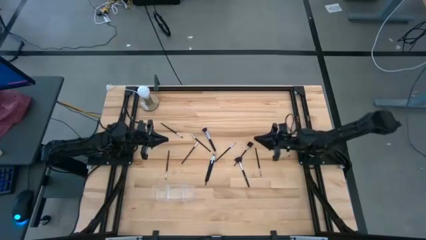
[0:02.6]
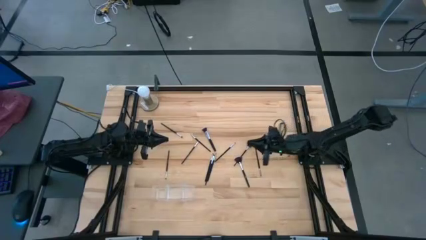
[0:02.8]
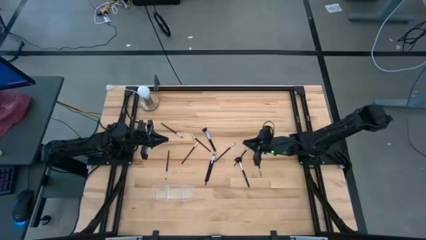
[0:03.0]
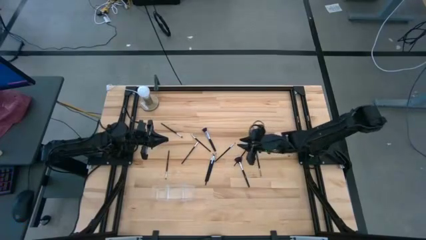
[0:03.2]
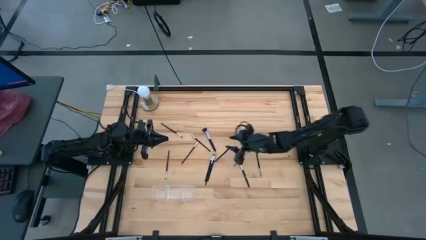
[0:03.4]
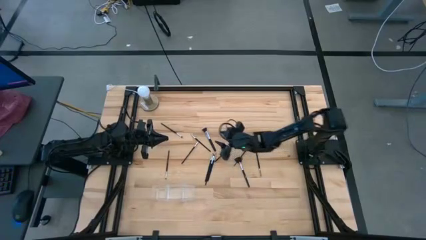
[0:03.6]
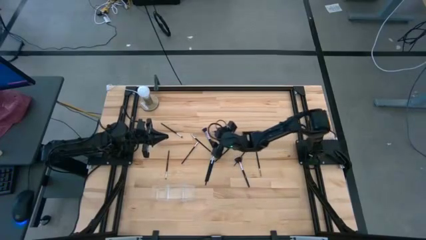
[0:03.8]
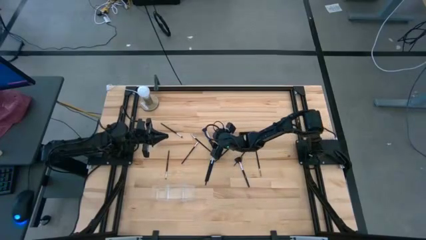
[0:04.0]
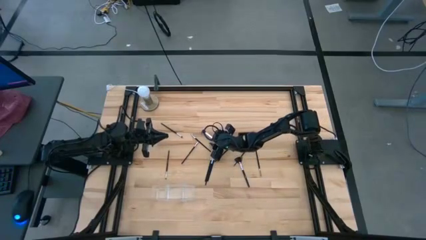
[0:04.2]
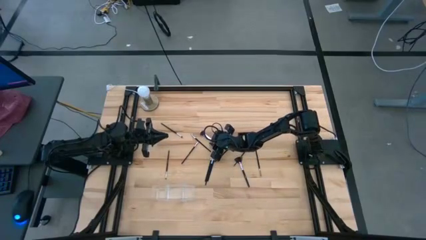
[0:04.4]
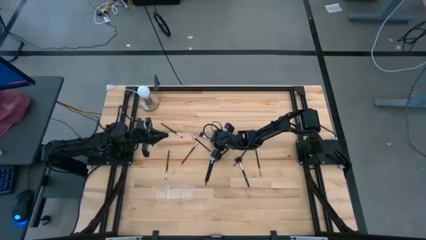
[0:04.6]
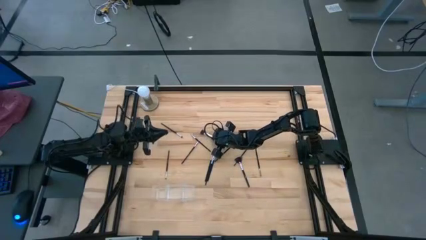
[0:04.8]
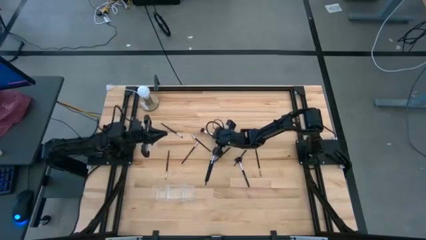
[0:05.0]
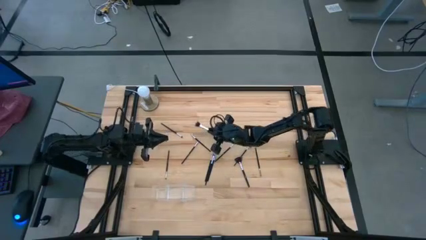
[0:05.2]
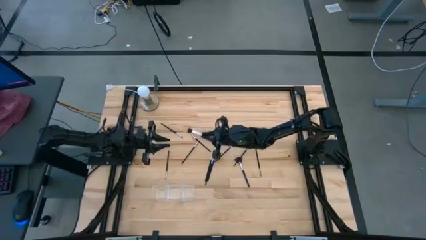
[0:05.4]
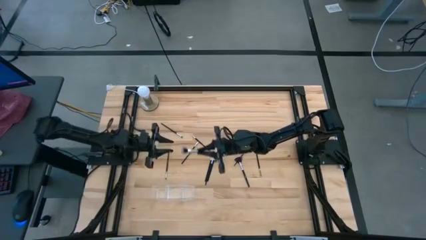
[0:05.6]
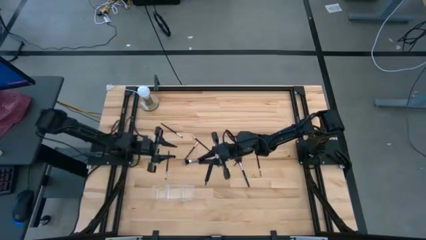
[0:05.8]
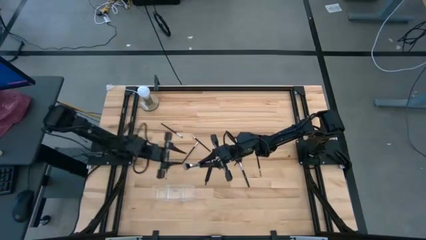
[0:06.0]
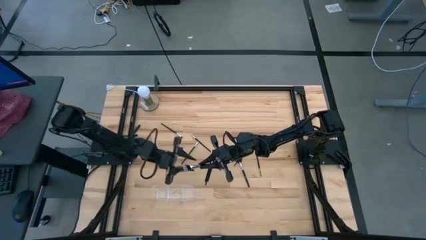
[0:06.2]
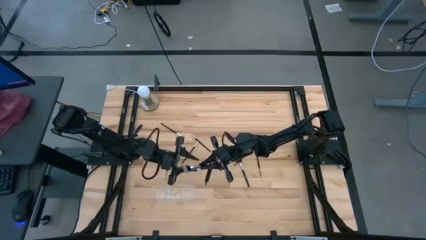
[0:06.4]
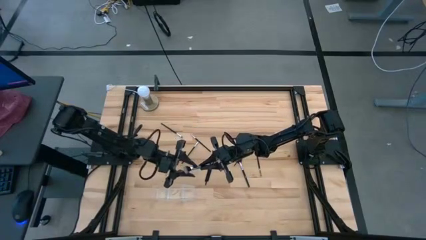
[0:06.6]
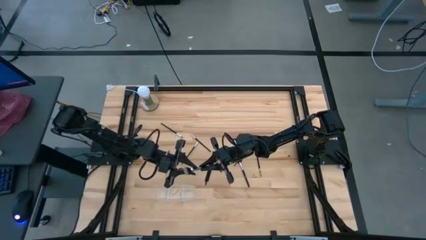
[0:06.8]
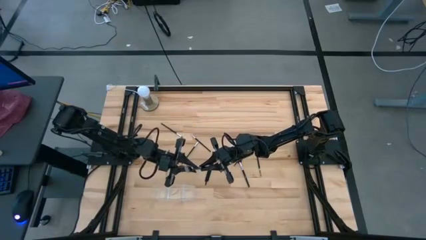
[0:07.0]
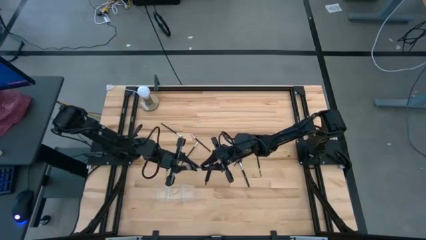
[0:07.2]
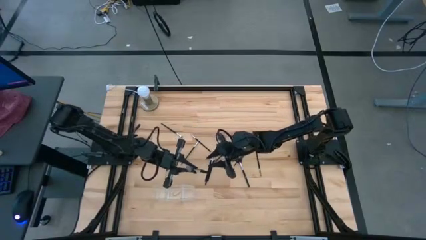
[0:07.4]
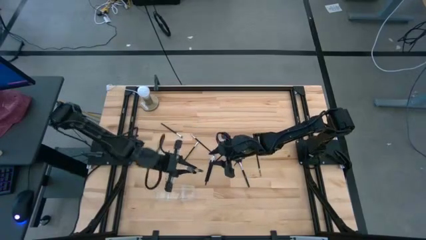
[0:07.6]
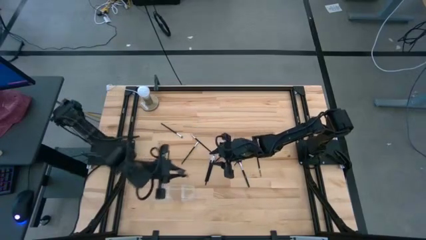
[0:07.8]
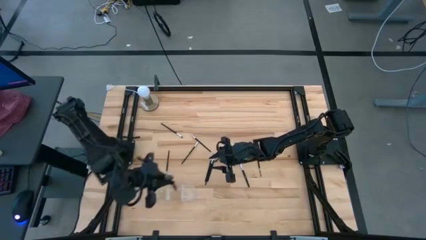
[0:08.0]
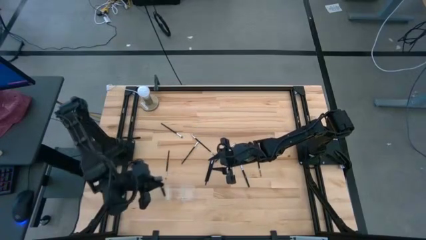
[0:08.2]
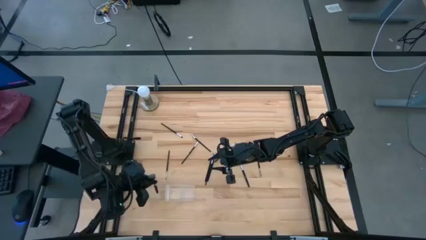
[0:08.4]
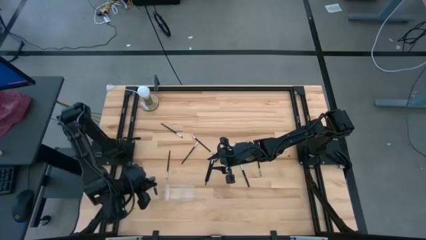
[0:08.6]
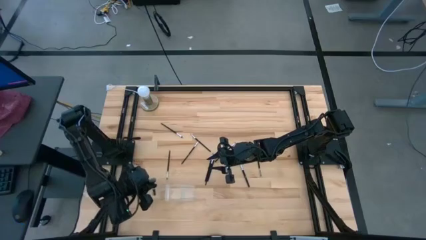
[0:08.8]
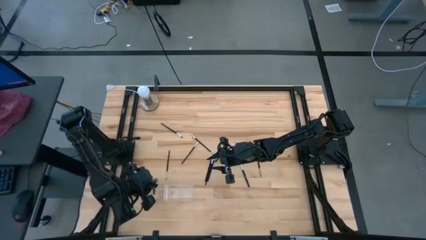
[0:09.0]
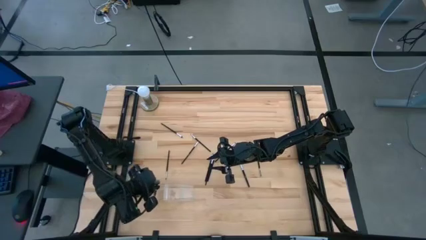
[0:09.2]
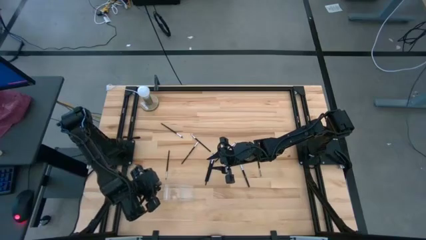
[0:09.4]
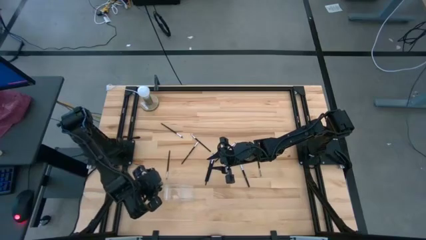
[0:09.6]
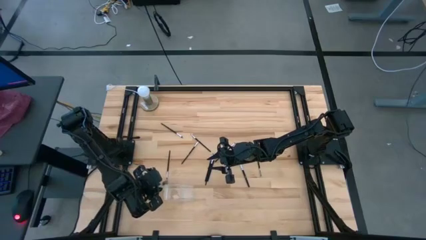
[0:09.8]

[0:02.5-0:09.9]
Task: Put items in baskets/containers
Put the black blush brush into the transparent organizer

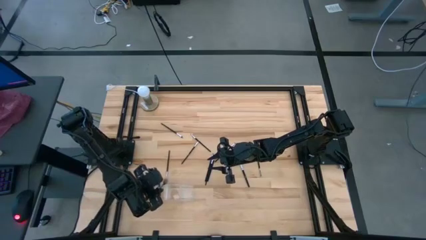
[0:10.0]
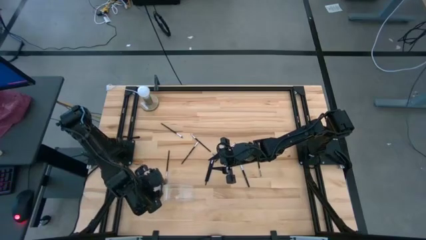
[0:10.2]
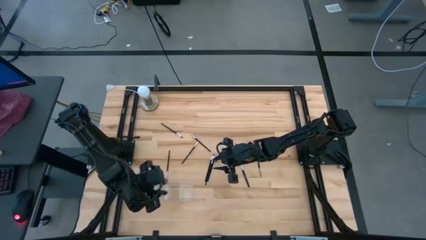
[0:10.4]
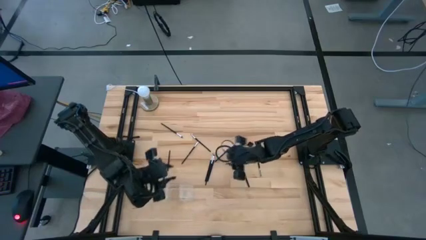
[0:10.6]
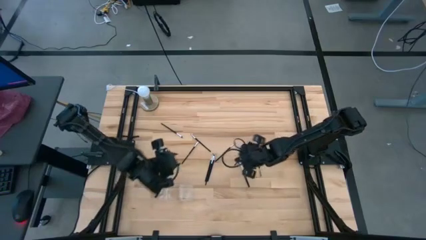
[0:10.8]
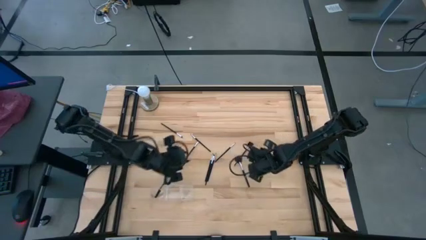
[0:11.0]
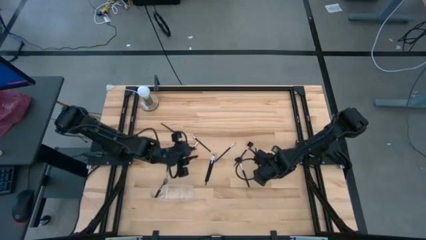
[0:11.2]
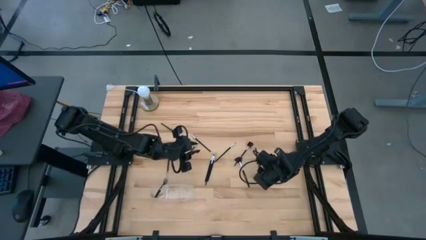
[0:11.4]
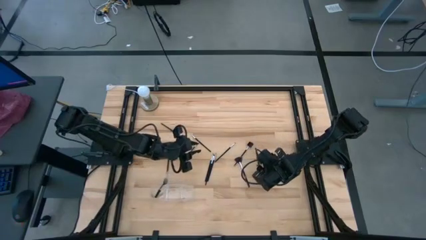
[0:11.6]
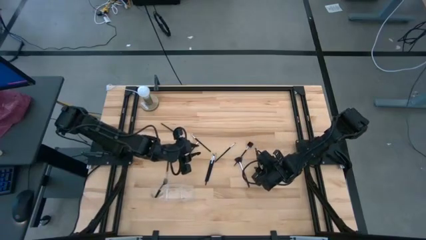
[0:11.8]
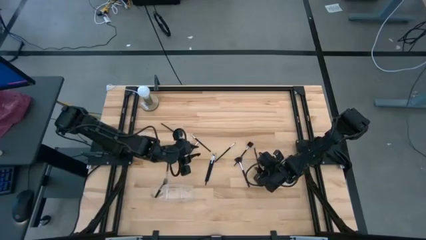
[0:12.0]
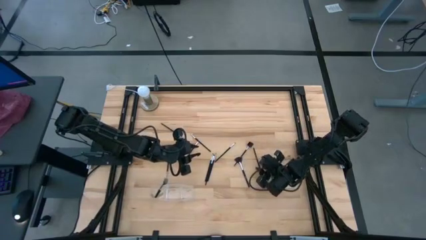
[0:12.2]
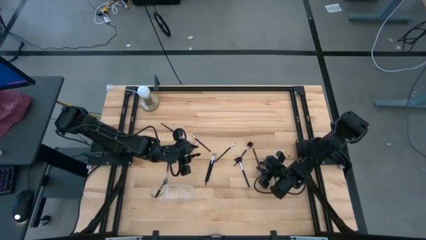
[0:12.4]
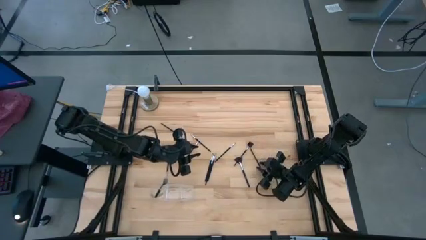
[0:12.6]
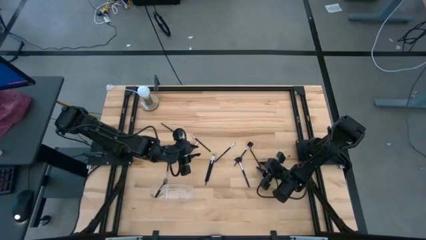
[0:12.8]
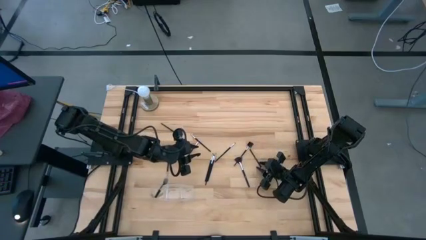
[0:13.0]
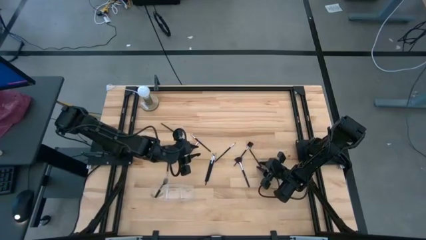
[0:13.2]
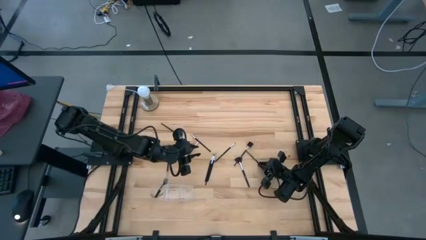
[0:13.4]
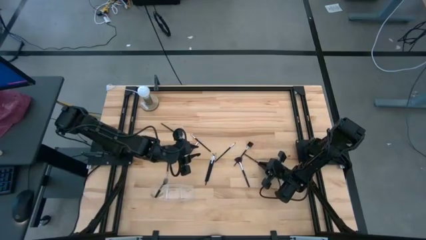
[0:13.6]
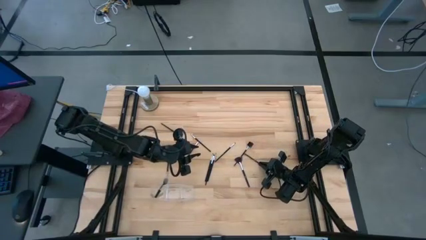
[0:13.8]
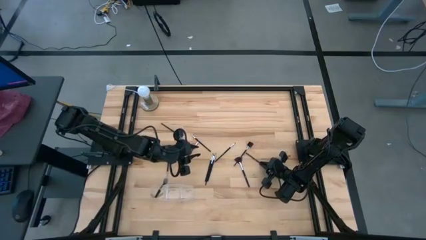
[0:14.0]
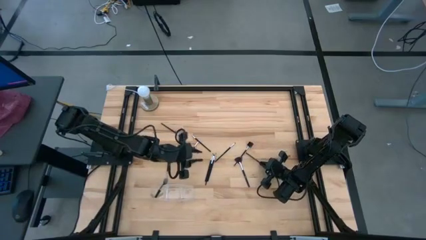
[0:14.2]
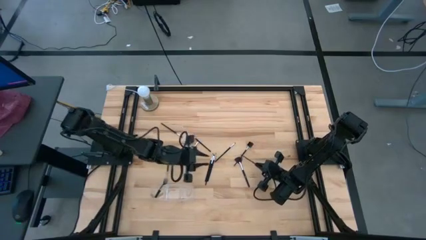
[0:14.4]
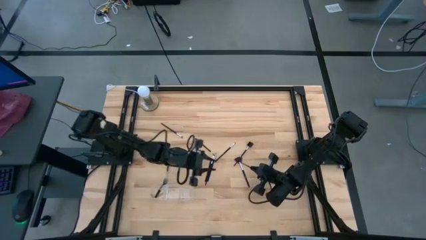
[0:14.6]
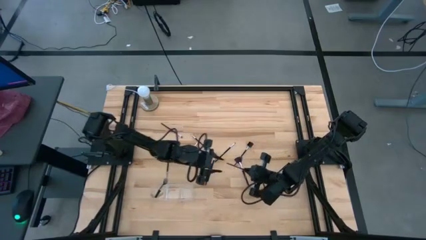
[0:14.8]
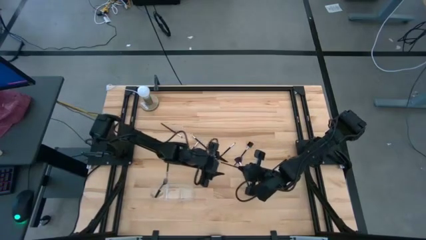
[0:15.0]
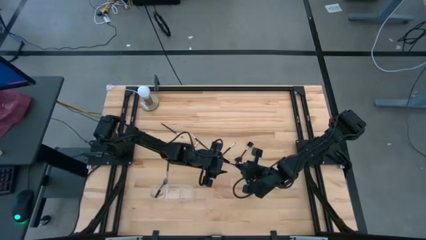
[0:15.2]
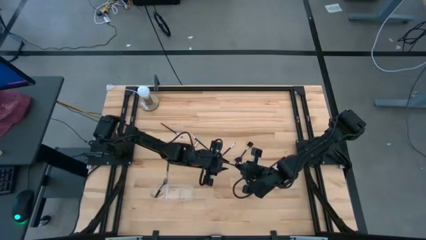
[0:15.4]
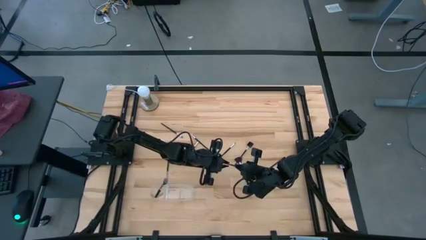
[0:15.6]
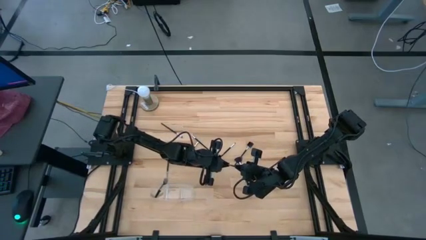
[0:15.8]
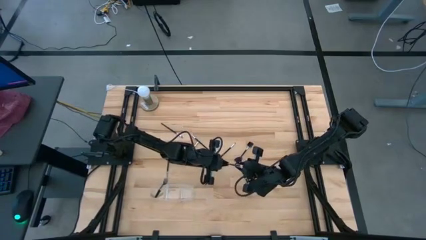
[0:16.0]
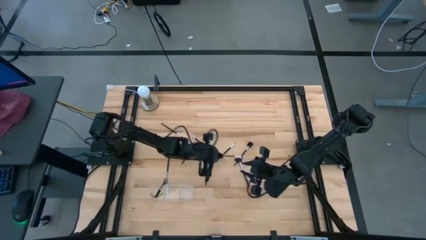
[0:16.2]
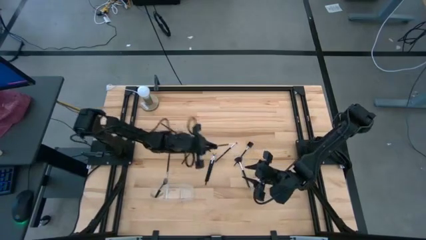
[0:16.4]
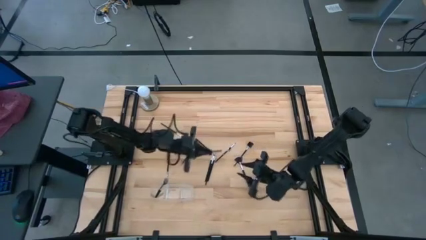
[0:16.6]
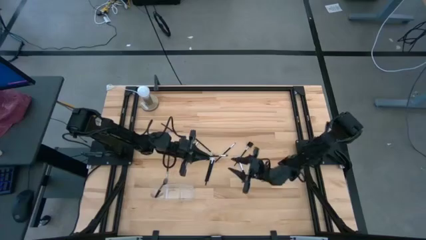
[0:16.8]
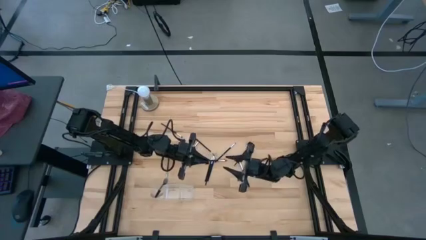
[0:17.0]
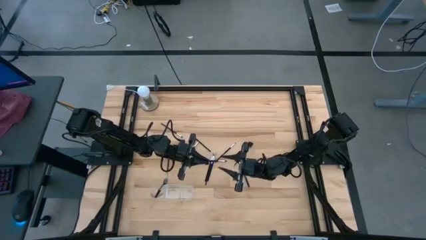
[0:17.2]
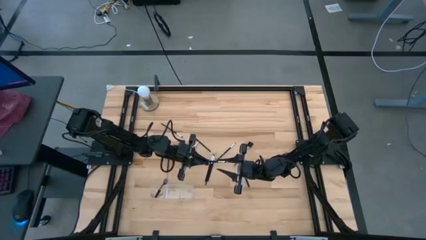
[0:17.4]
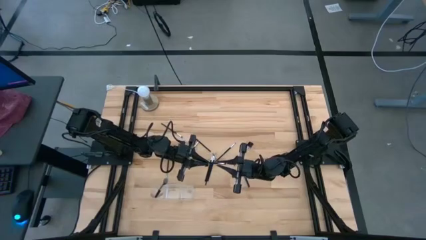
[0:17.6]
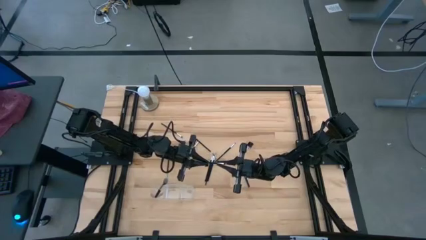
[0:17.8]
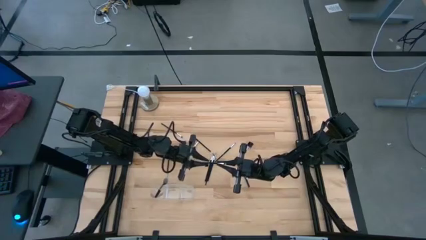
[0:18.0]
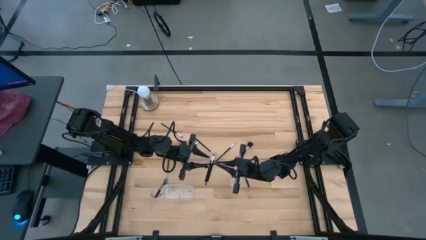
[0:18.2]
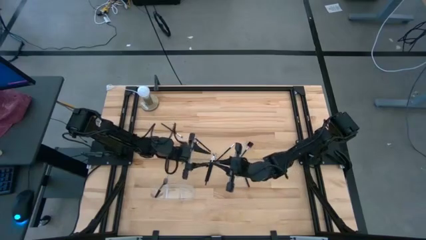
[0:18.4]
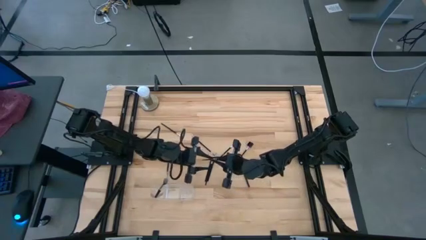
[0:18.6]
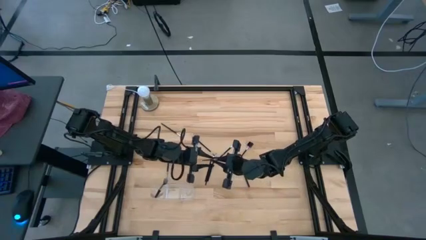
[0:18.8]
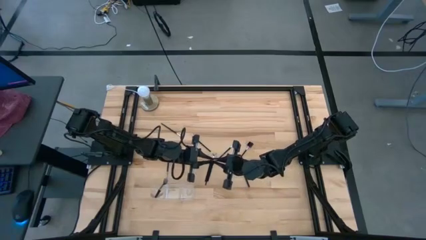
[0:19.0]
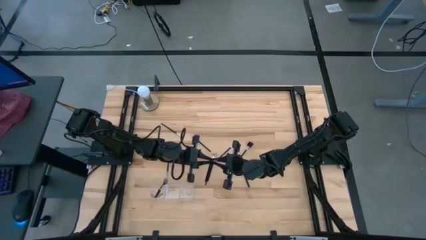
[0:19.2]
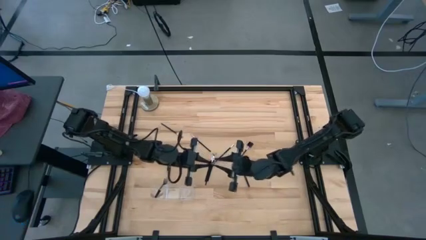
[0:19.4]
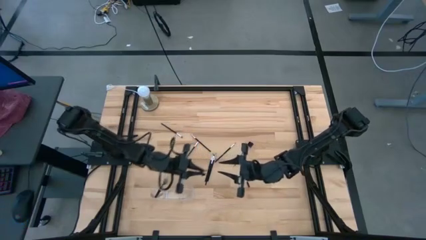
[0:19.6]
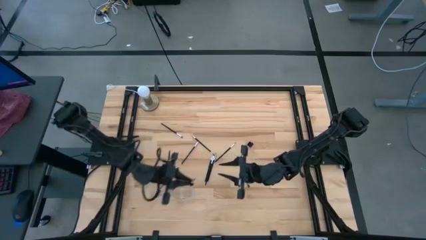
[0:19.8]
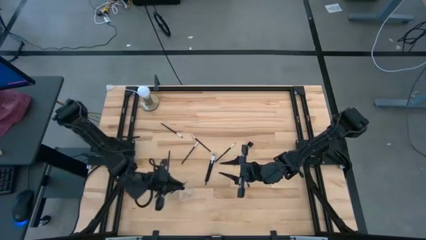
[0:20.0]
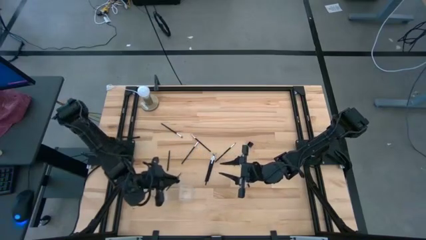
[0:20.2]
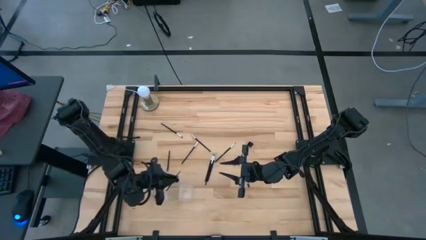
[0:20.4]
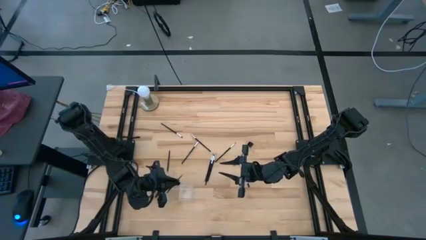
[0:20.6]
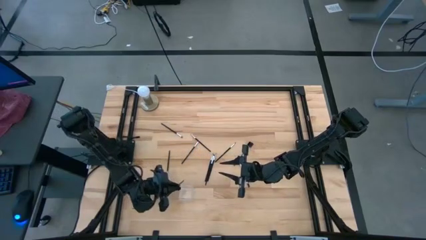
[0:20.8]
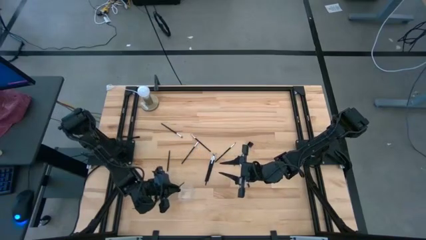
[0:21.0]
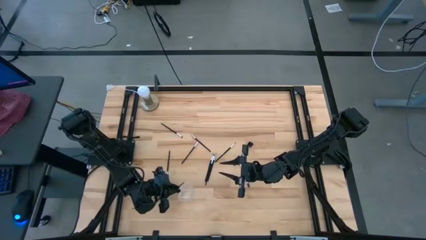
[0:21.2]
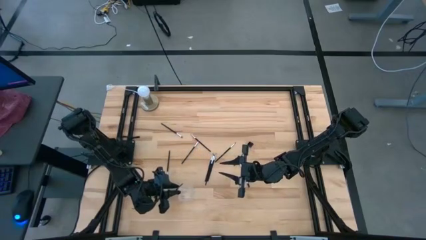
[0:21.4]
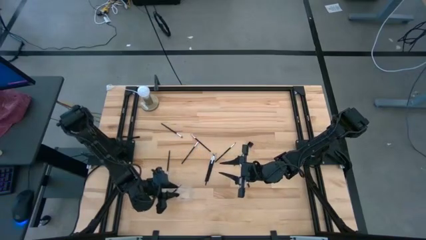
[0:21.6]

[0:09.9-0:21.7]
Put the black eyeshadow brush into the transparent organizer
